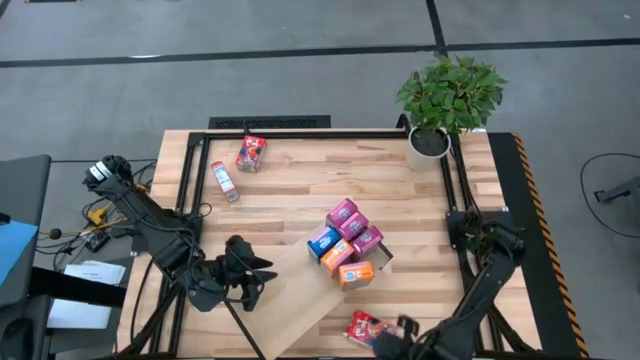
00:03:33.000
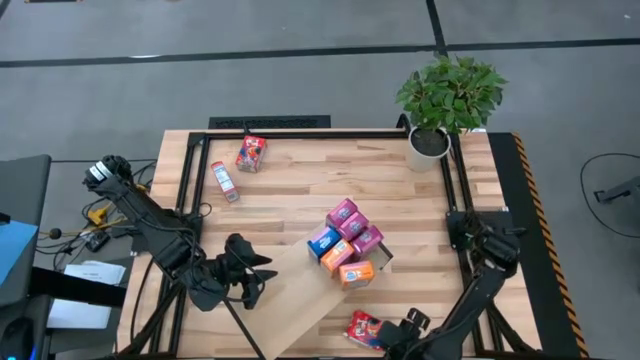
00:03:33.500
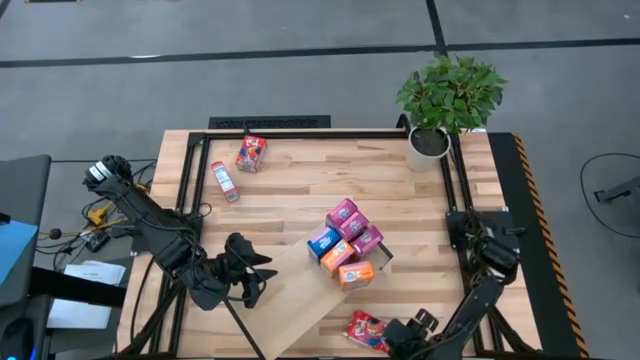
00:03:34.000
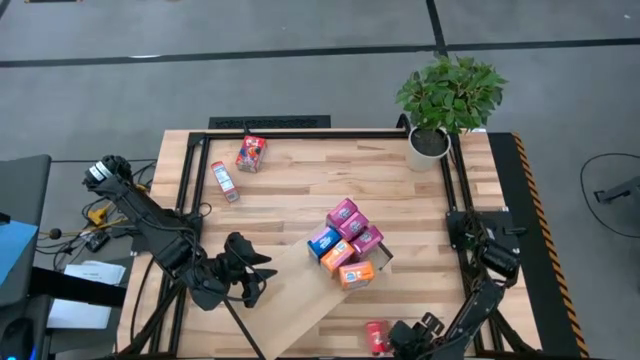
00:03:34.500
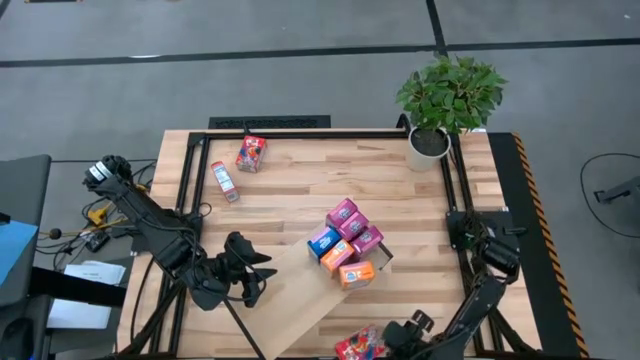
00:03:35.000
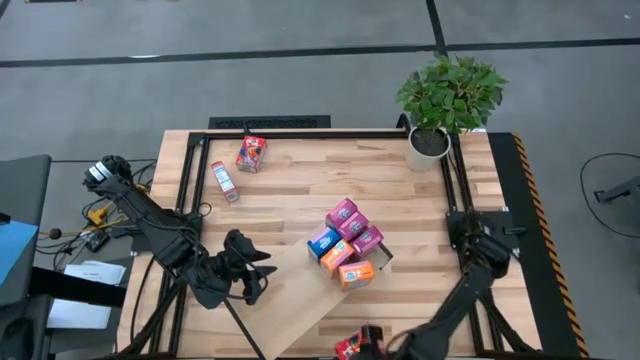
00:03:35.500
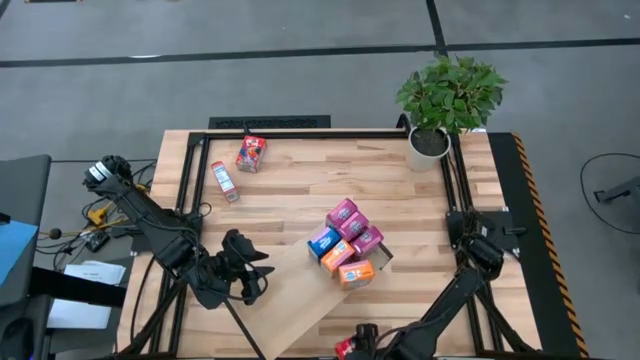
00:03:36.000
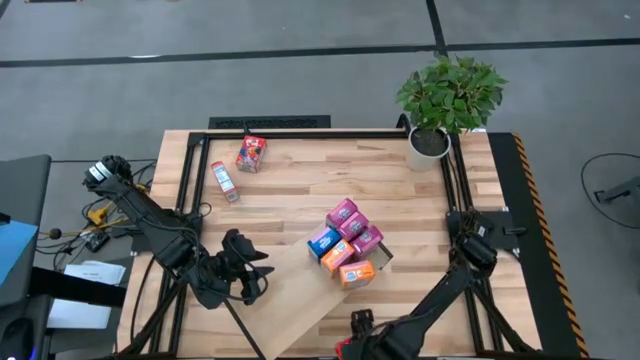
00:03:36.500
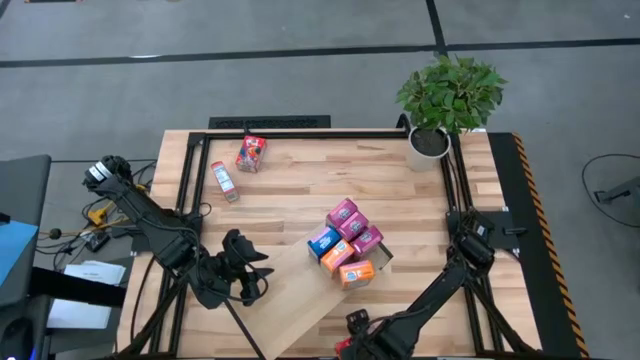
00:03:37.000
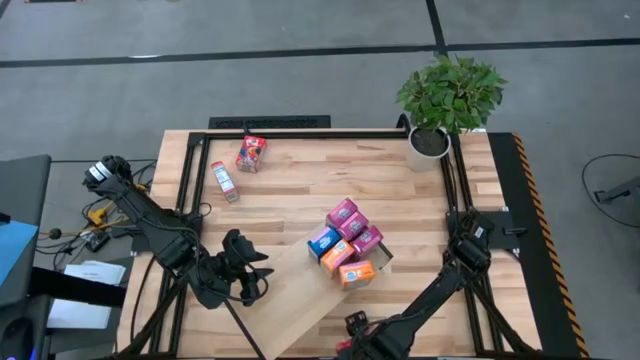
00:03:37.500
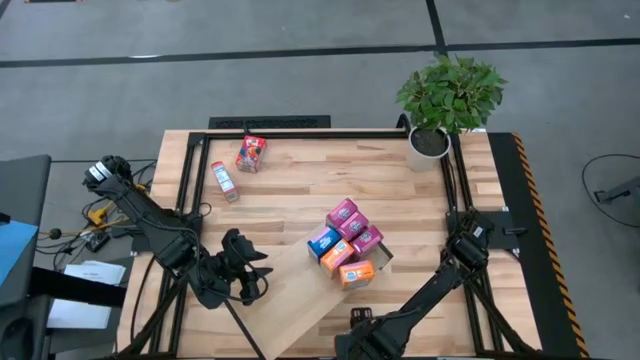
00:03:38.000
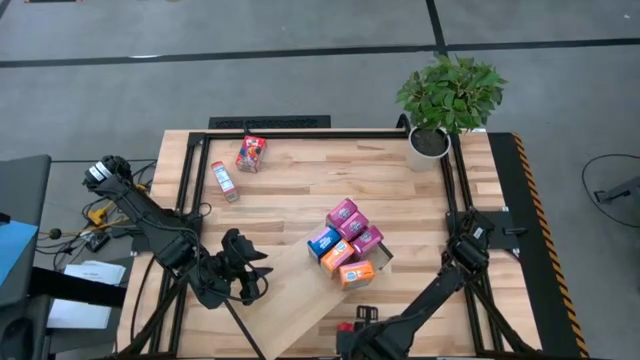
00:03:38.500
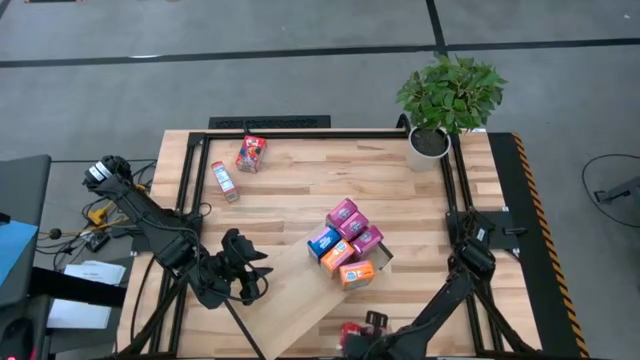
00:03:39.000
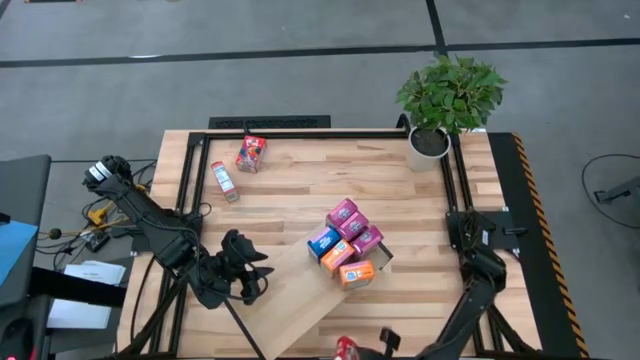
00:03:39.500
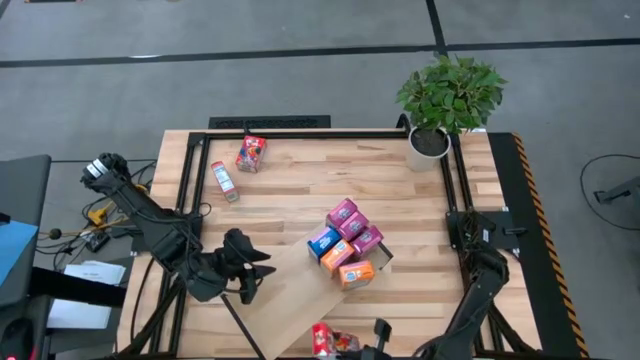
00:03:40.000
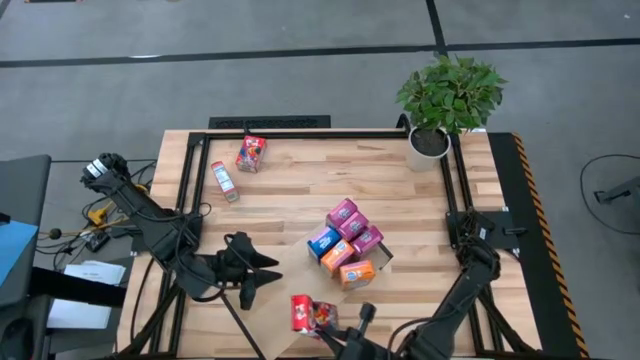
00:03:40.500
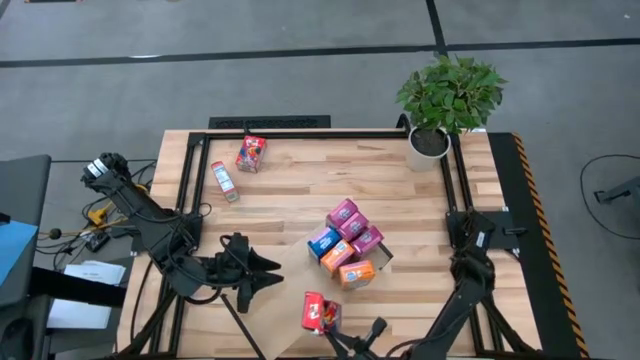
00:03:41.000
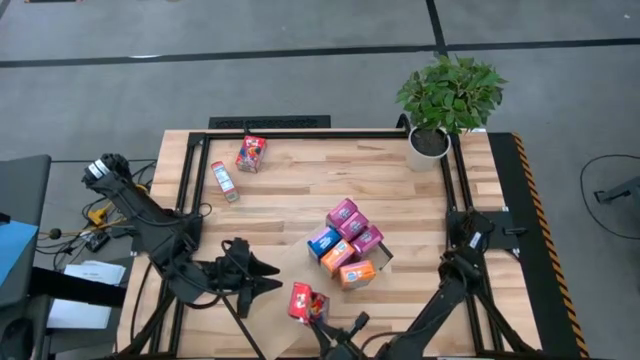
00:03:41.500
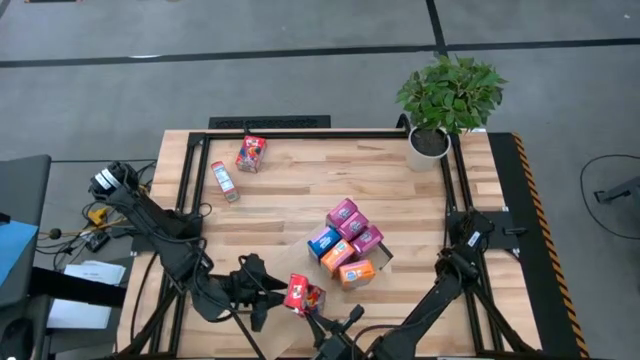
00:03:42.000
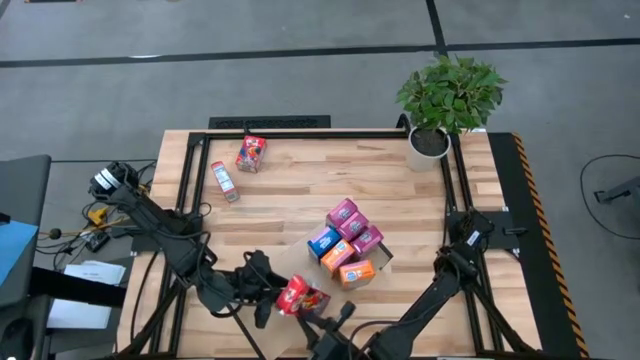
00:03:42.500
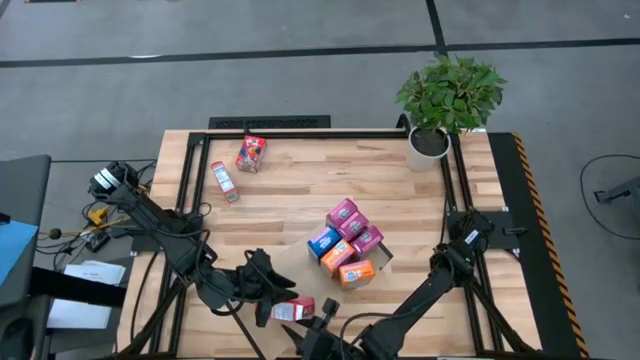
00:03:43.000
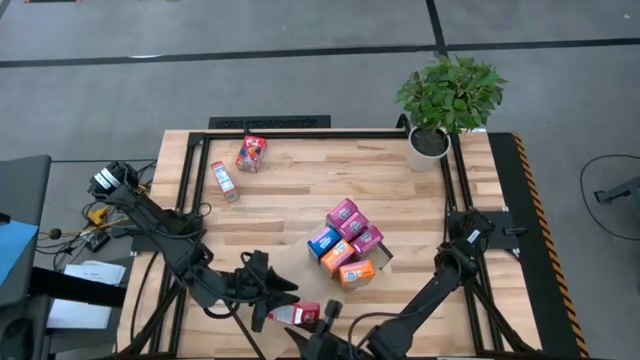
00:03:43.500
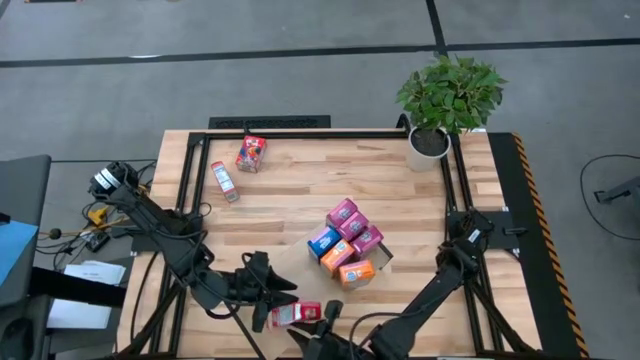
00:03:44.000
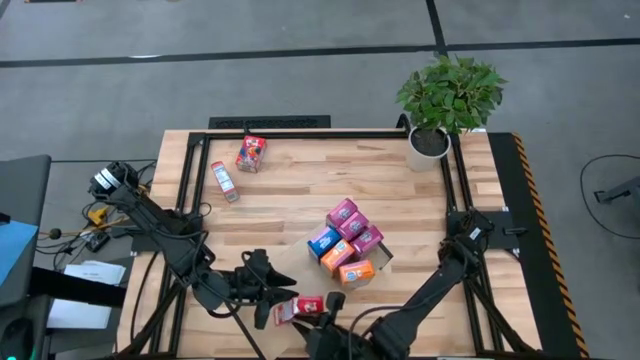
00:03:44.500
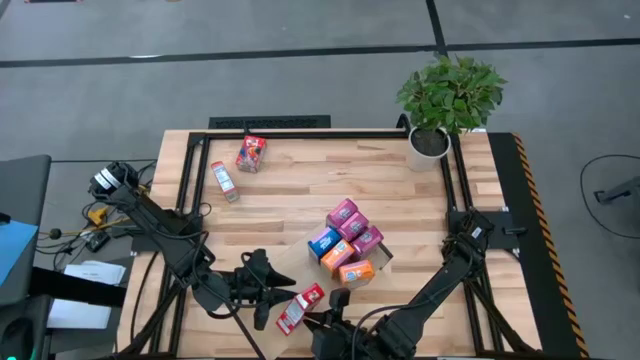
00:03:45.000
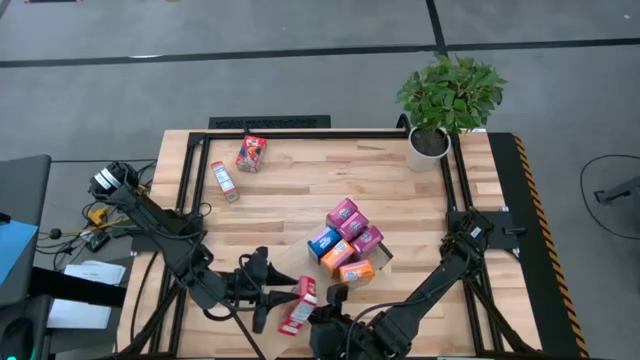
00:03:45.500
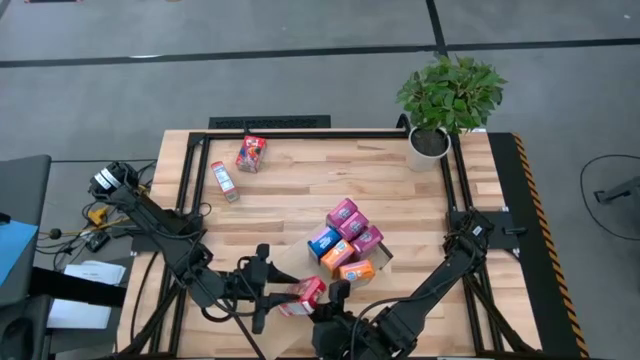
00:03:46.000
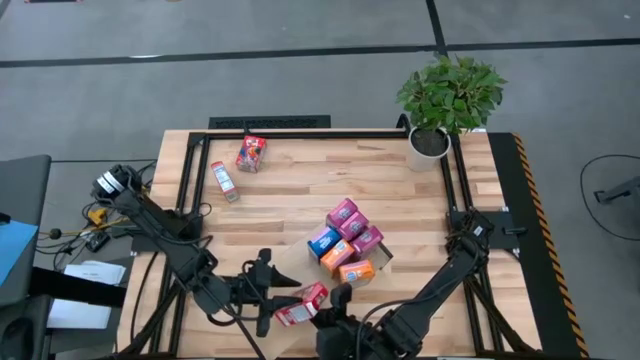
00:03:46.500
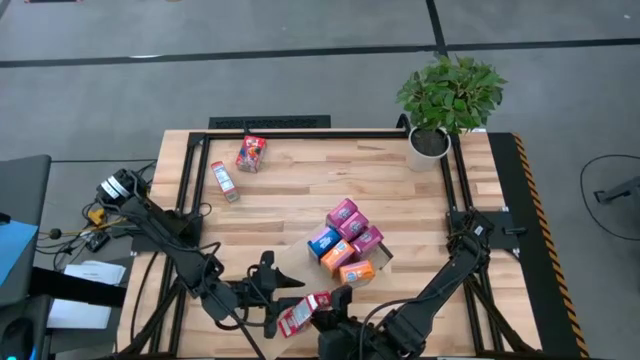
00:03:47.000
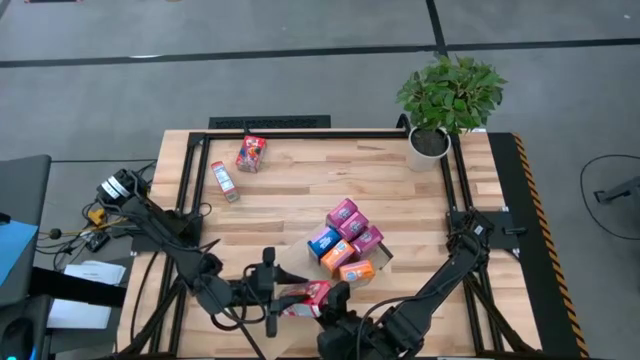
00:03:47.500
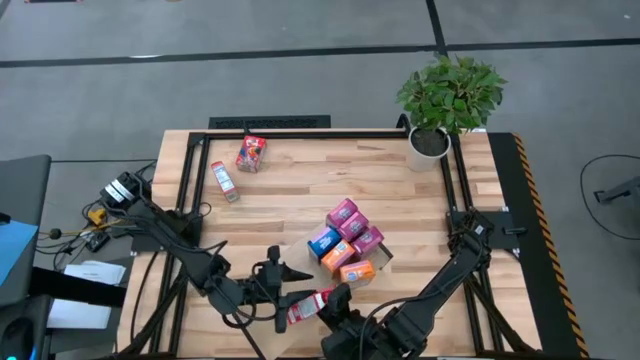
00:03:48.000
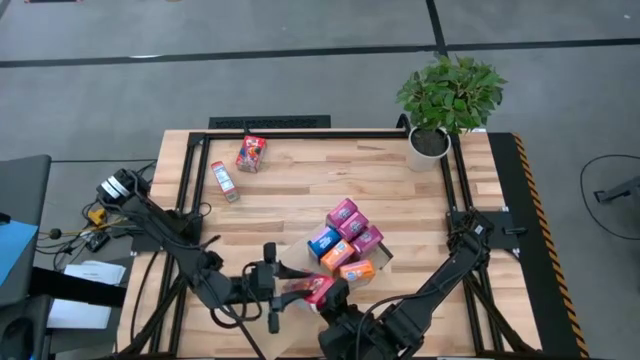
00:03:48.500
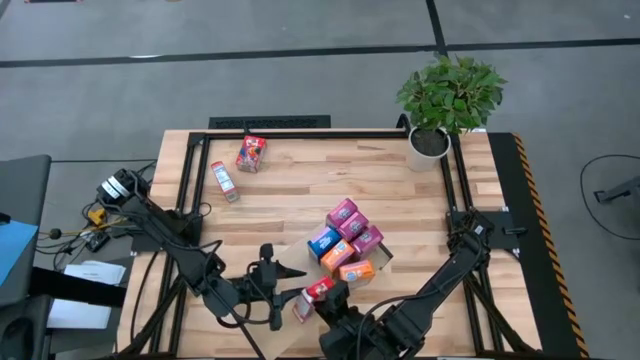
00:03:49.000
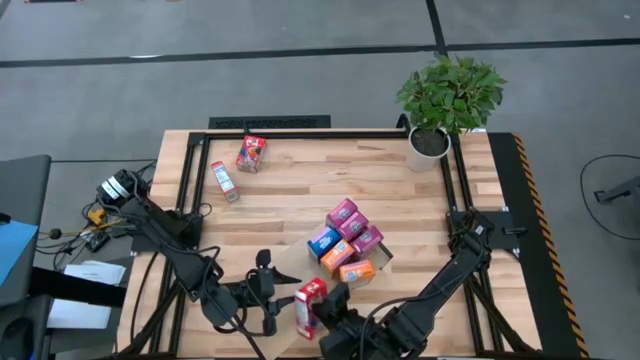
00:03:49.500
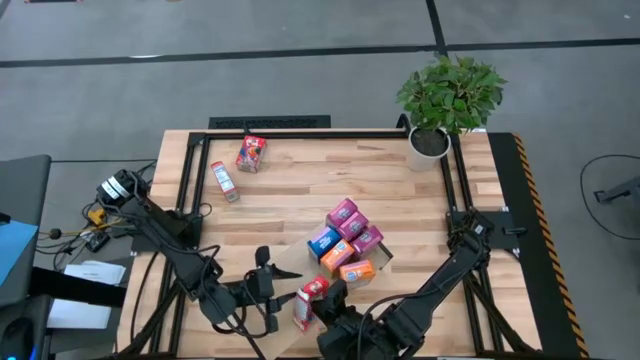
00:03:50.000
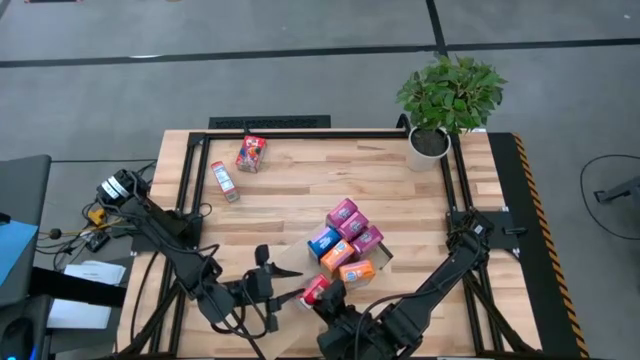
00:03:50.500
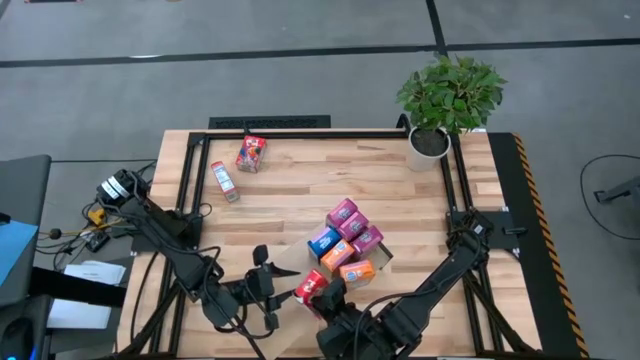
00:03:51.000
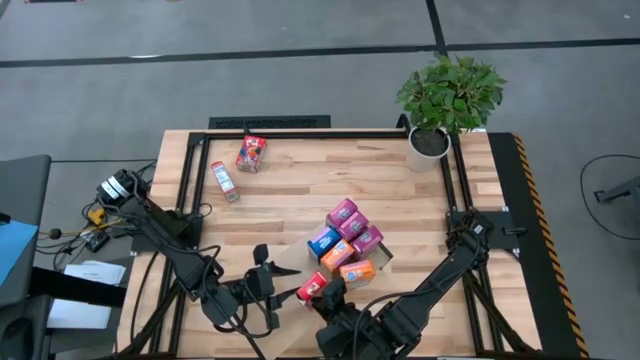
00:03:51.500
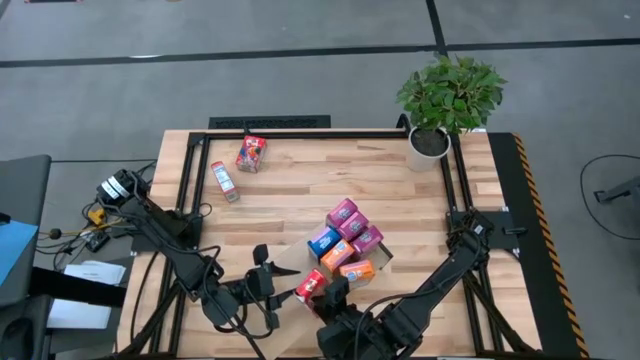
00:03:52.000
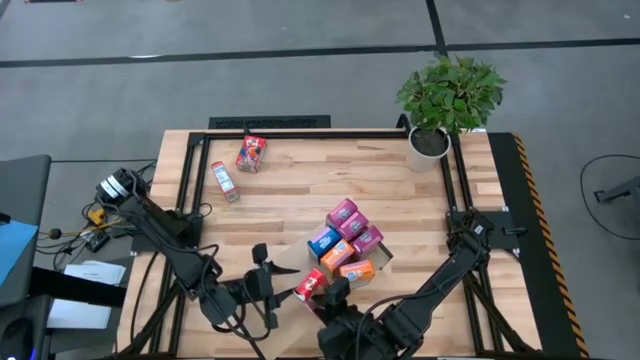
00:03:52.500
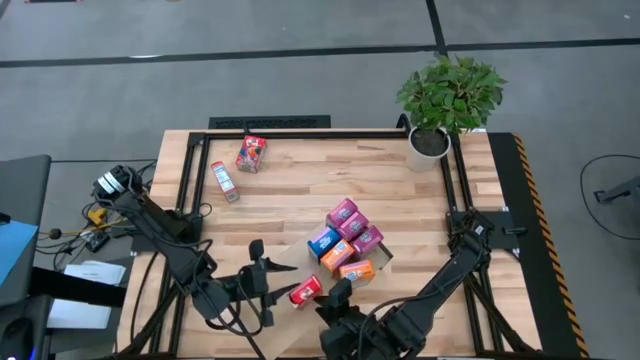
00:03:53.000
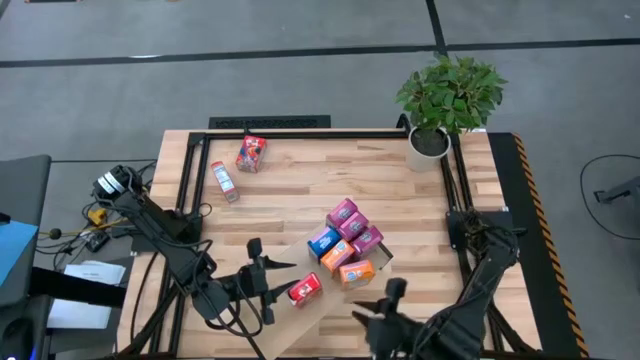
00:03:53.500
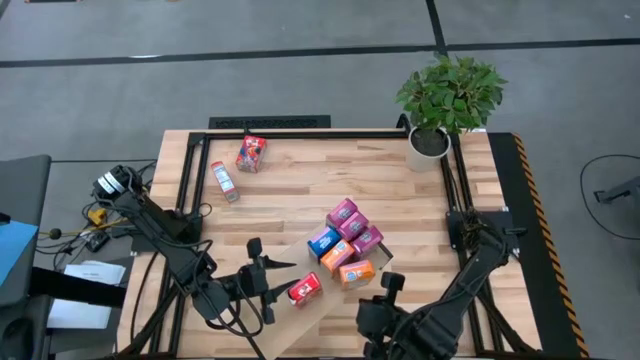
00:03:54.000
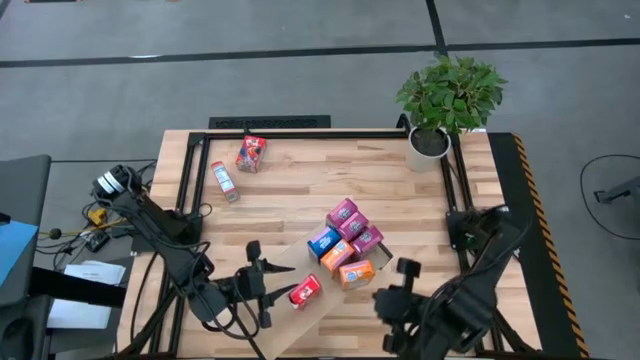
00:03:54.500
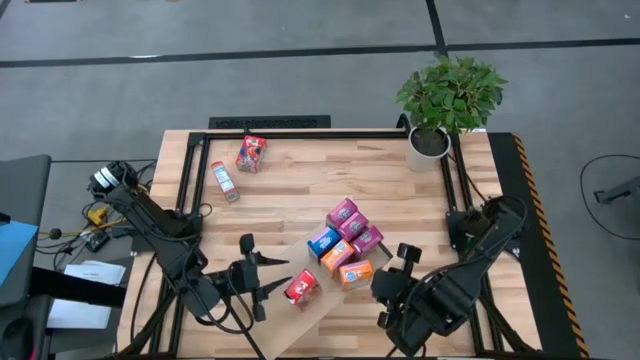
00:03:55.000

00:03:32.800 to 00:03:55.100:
Task: Stack cereal on shelf
Put the bottom red cereal box onto the shelf
